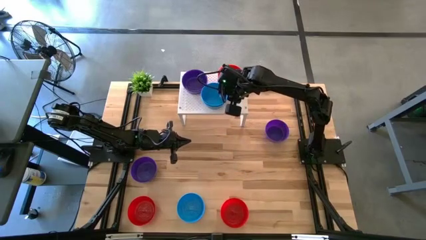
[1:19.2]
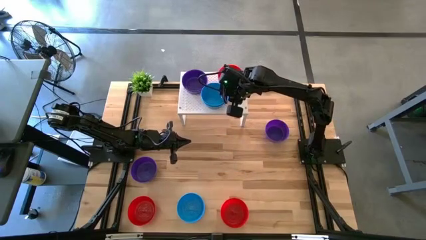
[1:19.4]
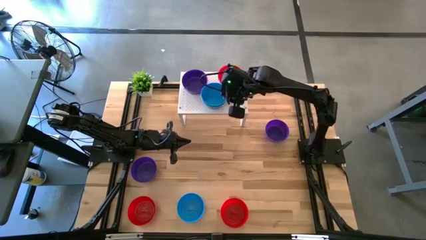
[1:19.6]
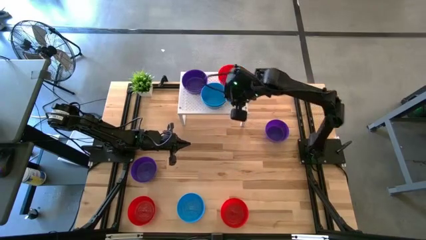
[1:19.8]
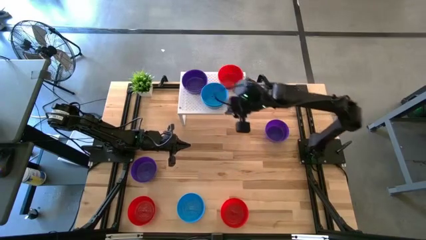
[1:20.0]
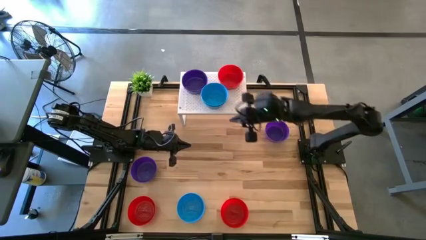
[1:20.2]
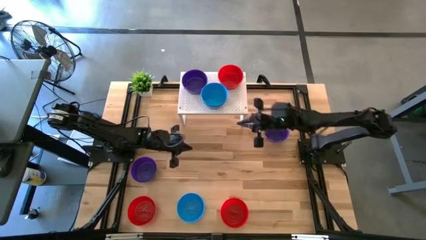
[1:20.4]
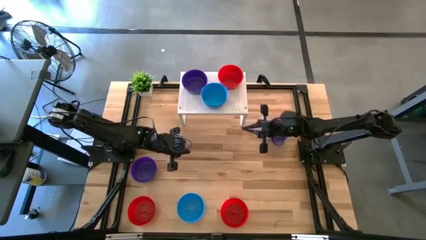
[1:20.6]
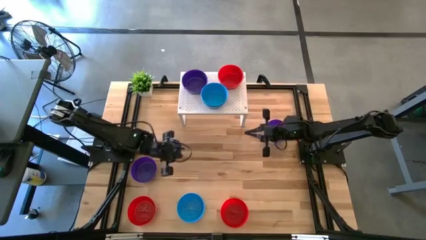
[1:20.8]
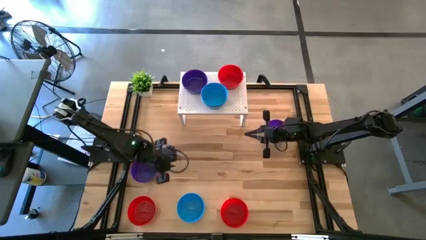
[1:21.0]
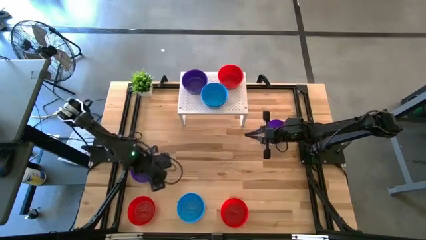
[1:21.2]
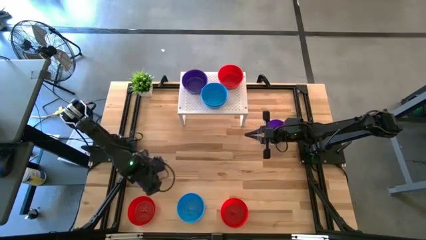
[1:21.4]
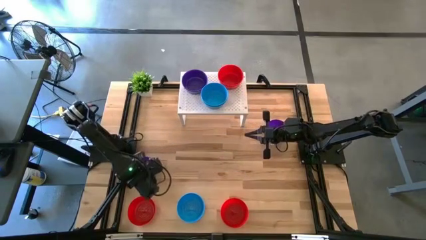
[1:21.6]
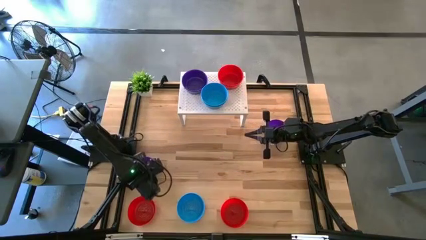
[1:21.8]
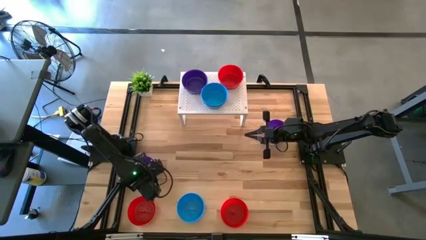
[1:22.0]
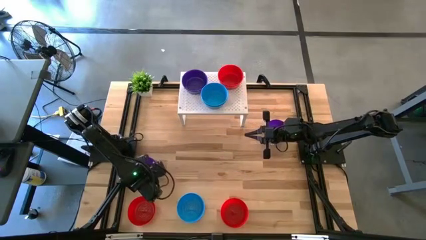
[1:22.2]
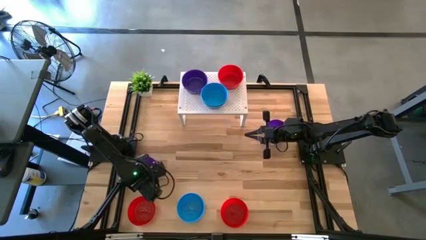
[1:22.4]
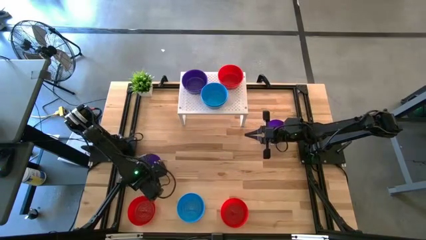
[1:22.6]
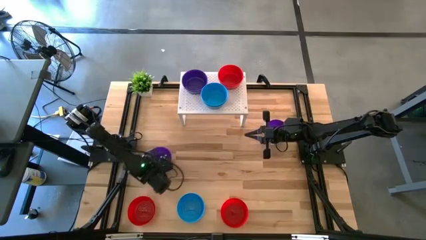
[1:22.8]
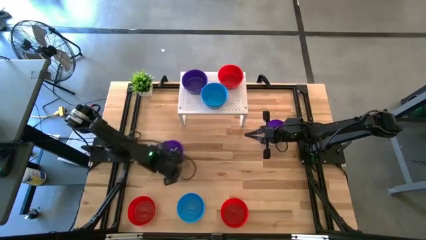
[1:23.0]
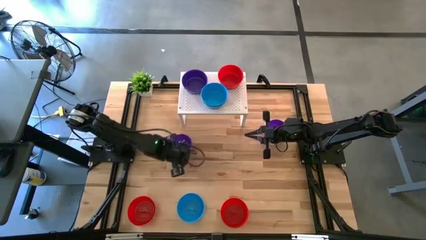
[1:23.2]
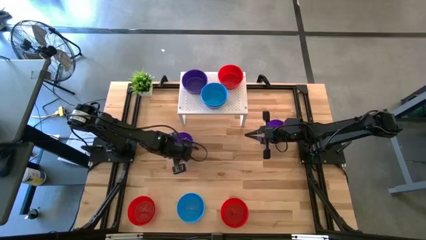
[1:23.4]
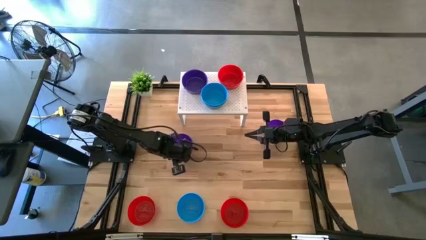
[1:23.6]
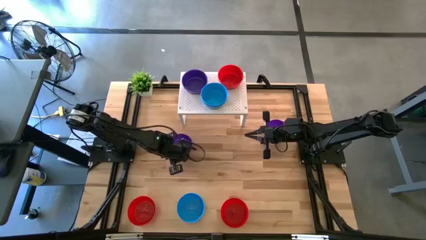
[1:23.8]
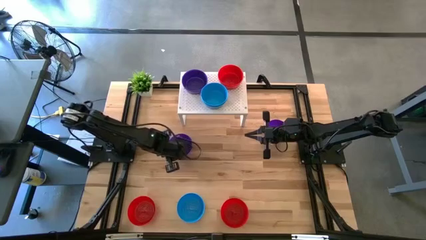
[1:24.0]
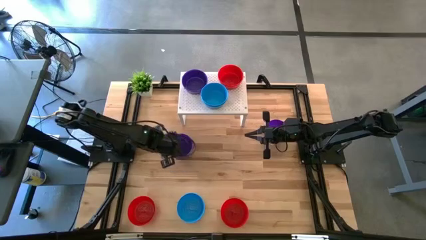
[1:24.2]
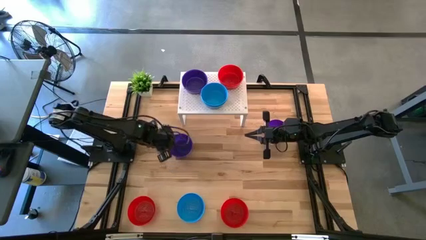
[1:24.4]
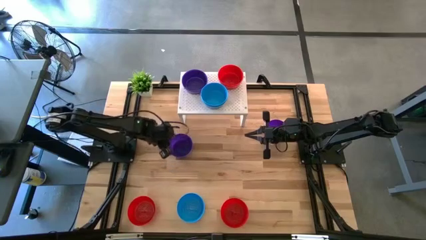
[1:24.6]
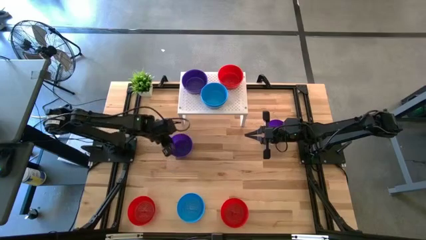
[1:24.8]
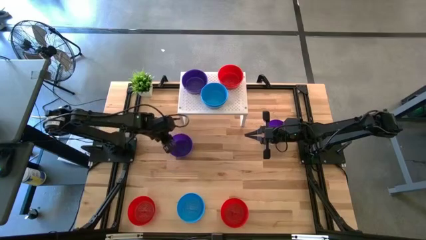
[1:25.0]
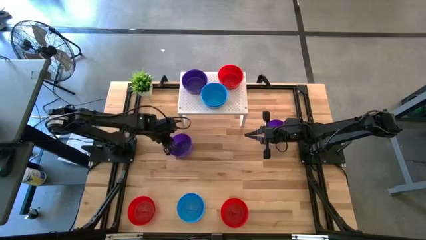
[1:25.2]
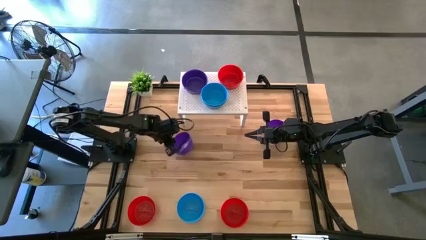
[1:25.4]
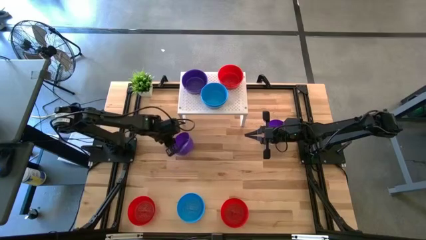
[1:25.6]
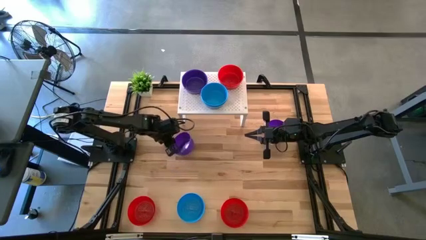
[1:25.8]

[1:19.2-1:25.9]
Task: Pick & Place Mini bowls
Stack the purple bowl on the purple bowl on the shelf

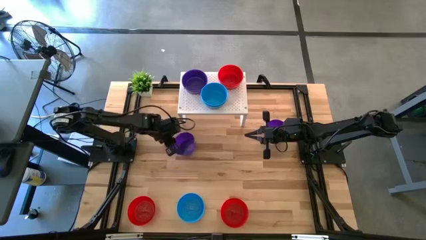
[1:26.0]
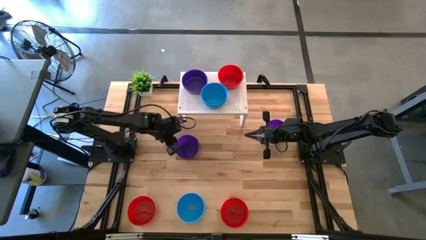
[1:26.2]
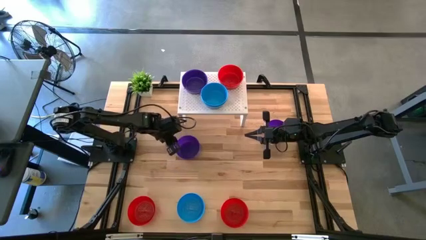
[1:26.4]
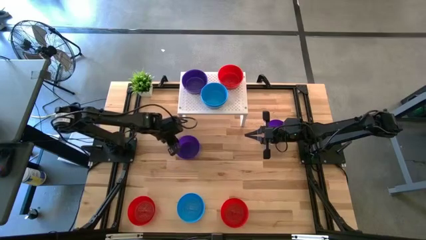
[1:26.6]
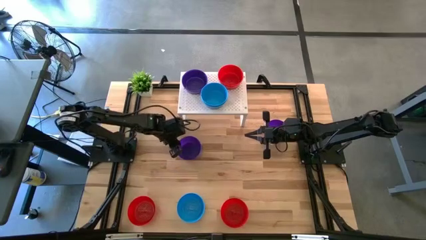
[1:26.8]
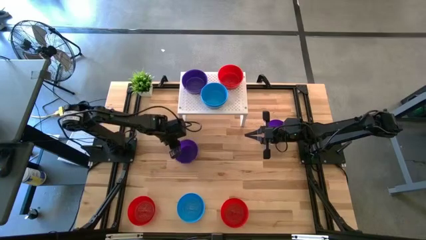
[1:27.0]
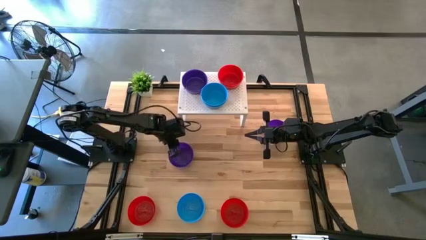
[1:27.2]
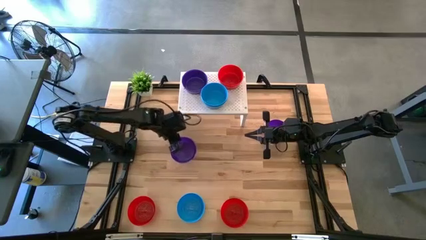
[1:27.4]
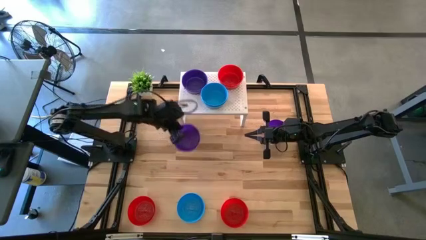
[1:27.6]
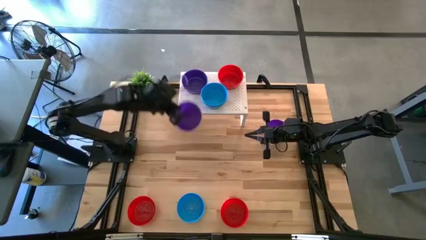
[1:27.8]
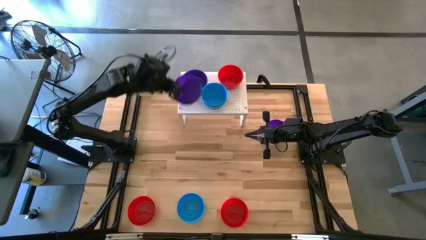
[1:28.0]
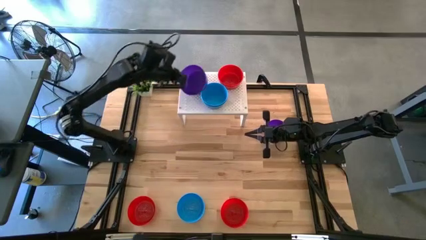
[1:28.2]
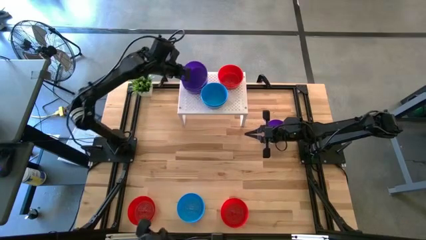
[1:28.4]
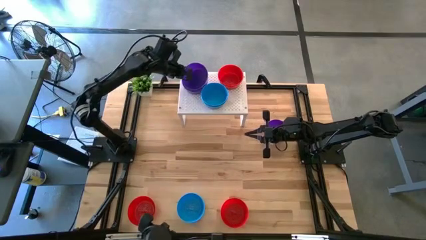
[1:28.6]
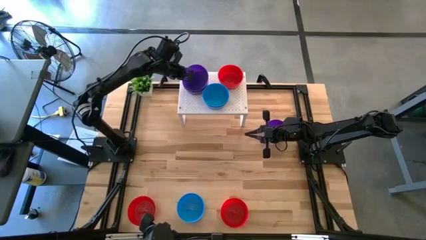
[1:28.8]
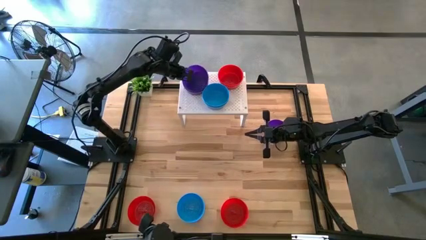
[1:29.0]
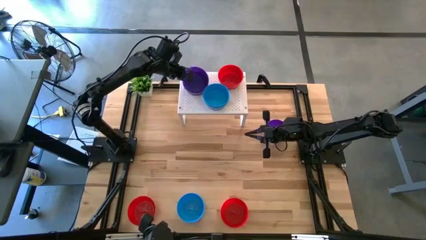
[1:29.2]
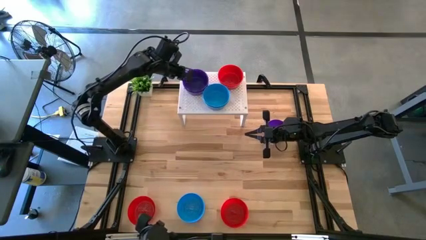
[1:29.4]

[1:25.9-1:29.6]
Stack the purple bowl on the purple bowl on the shelf

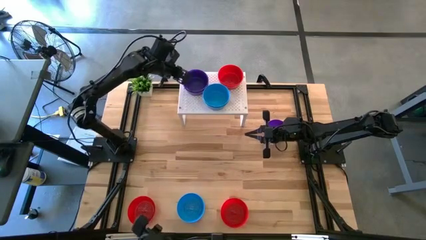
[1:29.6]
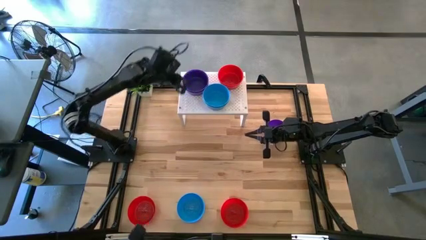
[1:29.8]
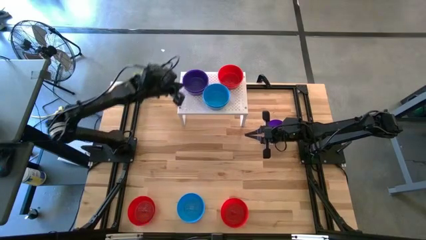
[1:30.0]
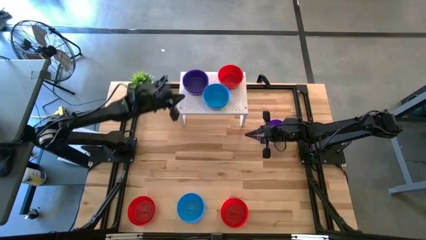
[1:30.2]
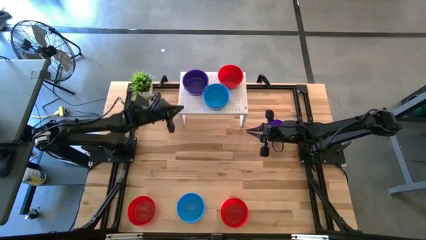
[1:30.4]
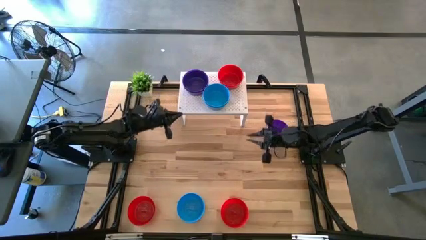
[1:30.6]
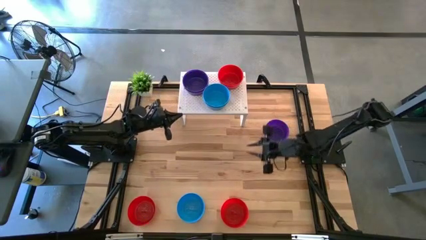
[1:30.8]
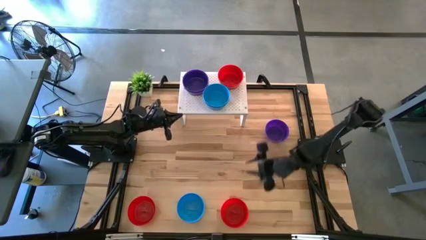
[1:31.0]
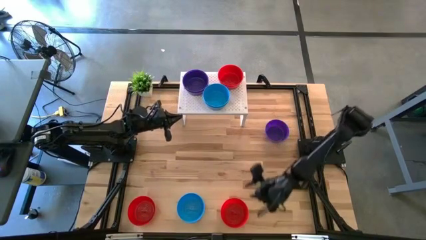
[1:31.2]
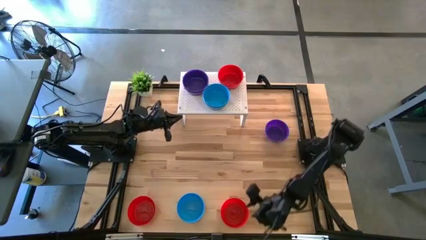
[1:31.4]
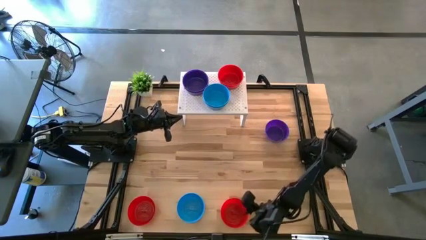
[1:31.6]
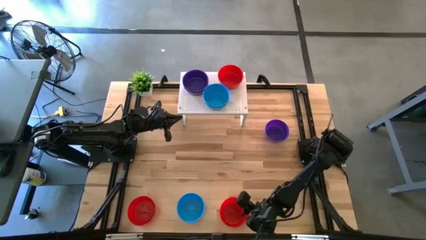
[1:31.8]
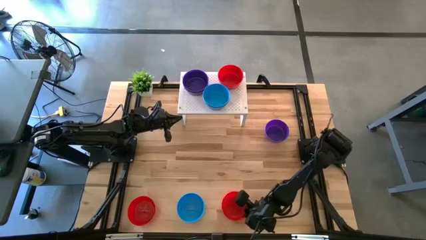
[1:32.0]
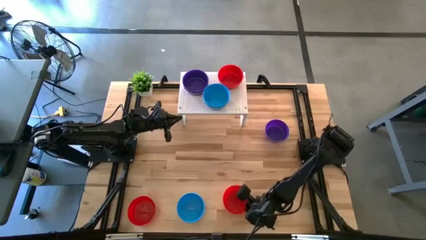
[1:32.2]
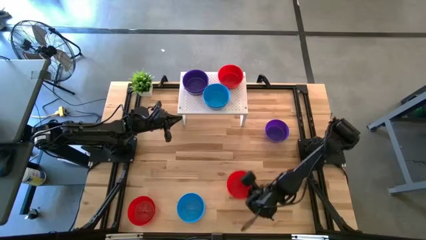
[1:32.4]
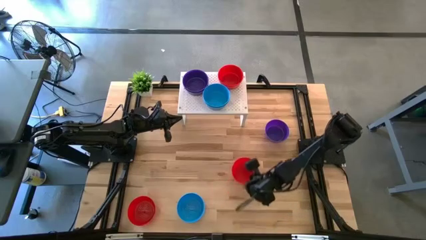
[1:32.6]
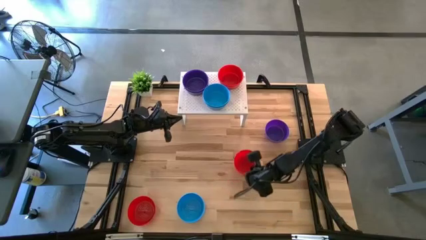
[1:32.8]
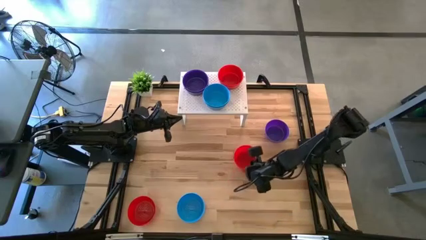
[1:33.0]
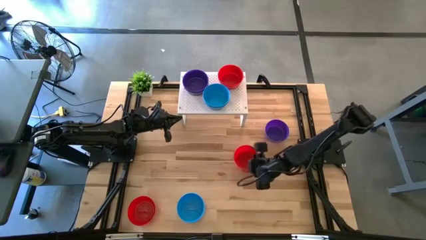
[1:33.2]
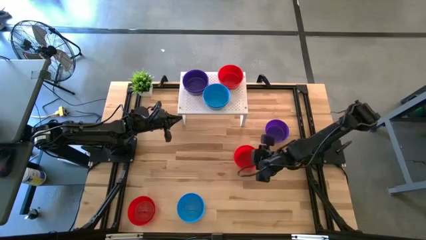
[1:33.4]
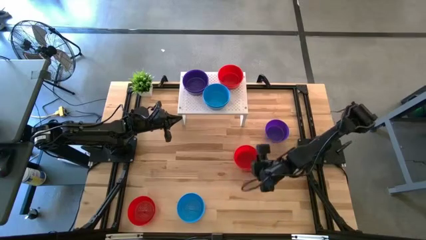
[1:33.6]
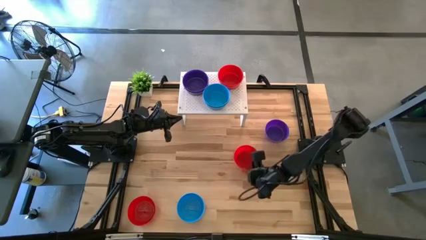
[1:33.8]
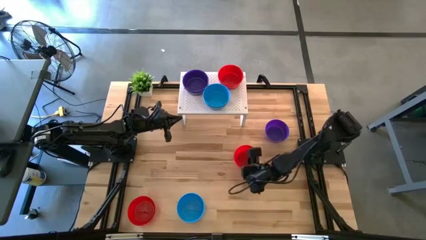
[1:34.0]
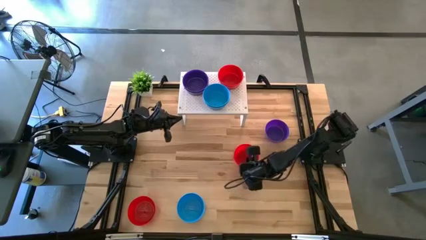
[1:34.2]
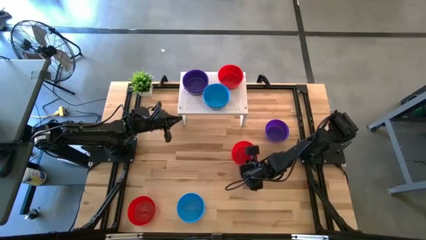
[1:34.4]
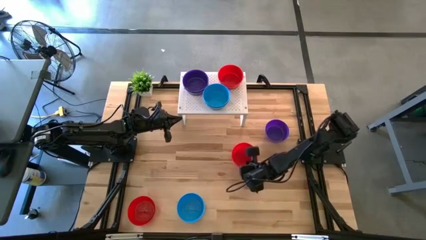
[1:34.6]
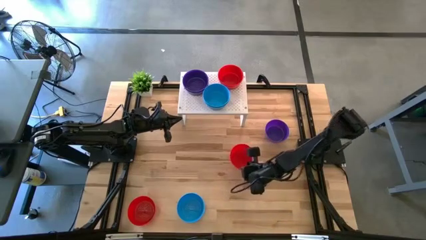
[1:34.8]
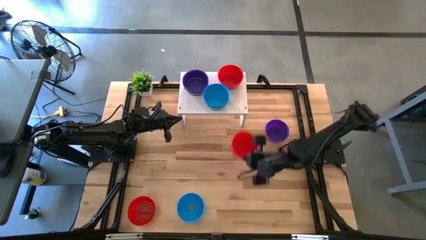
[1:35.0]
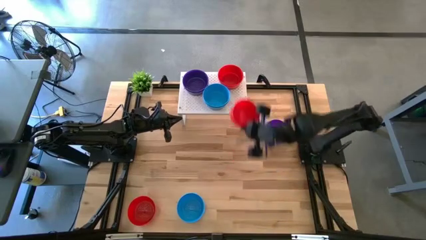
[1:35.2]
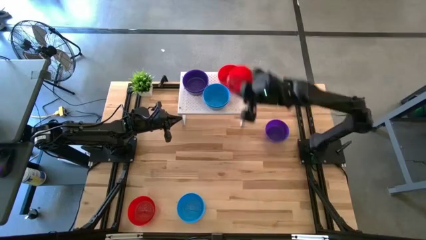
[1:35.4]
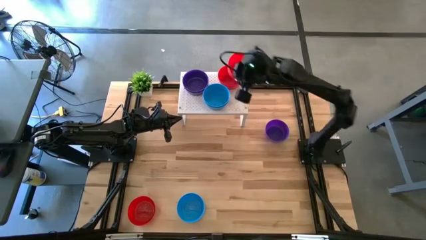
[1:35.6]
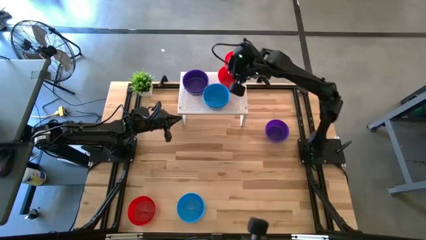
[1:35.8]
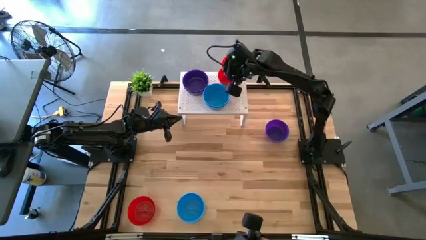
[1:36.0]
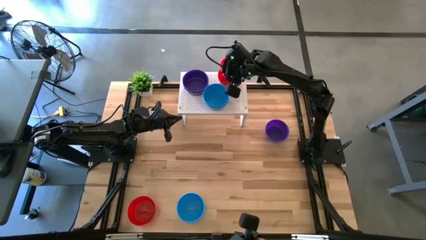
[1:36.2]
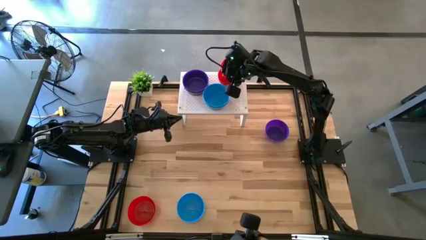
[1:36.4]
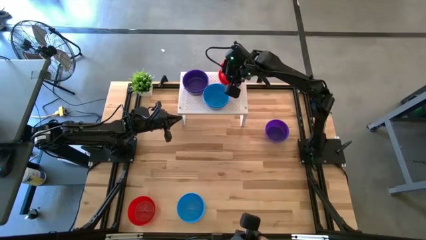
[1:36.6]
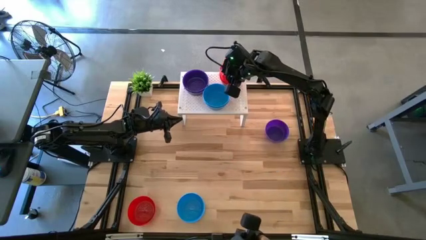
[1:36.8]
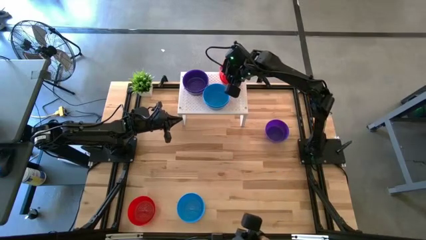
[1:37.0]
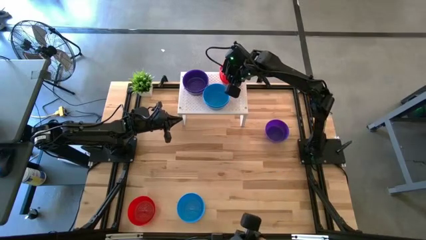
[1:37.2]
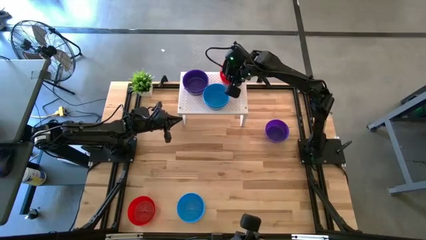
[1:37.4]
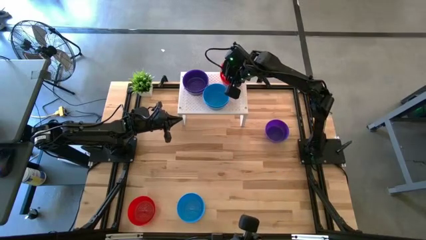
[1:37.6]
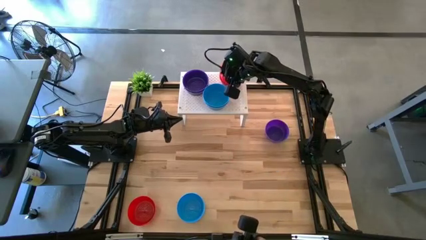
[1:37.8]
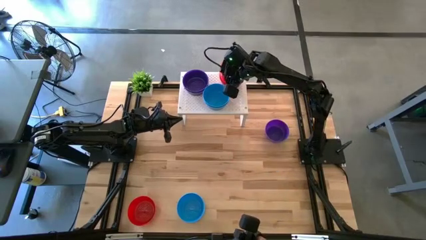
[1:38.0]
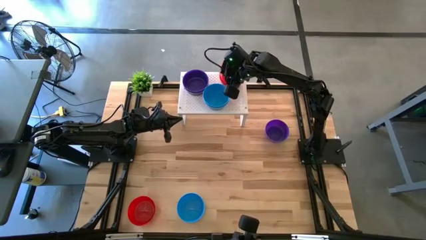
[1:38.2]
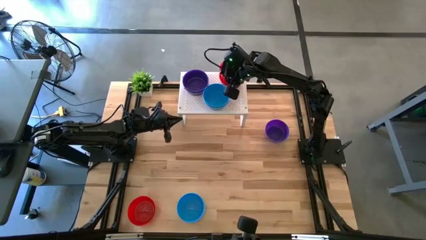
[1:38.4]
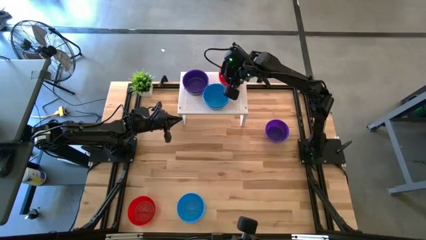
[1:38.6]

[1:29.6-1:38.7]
Stack the red bowl on the red bowl on the shelf
